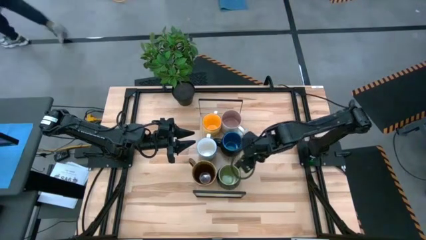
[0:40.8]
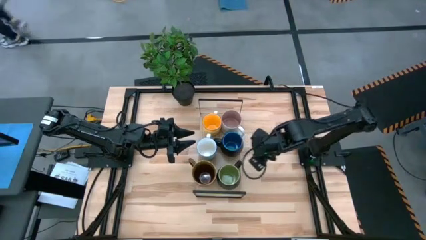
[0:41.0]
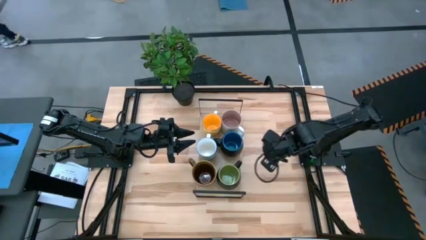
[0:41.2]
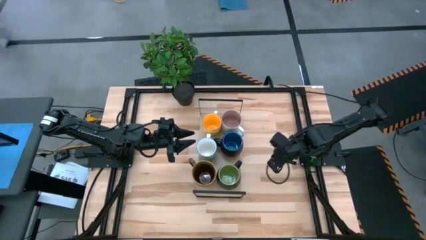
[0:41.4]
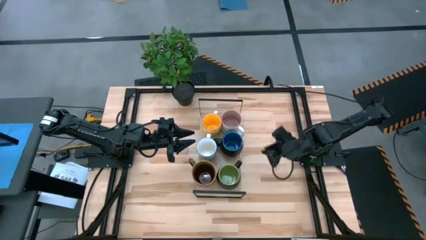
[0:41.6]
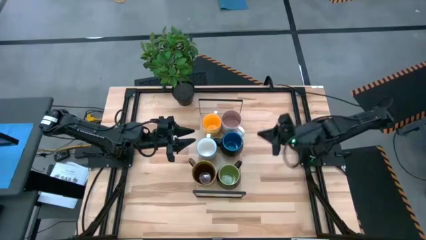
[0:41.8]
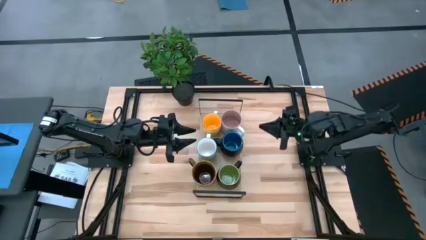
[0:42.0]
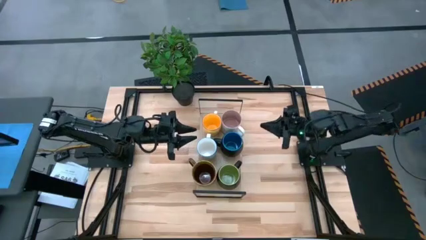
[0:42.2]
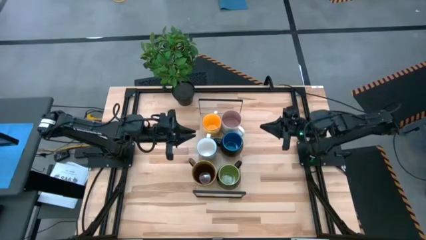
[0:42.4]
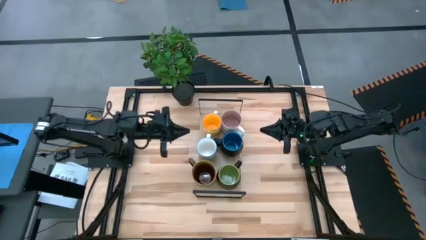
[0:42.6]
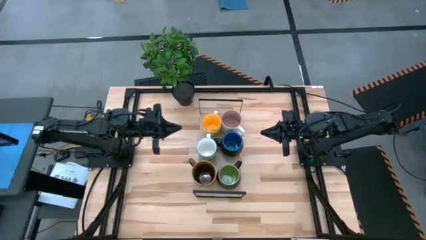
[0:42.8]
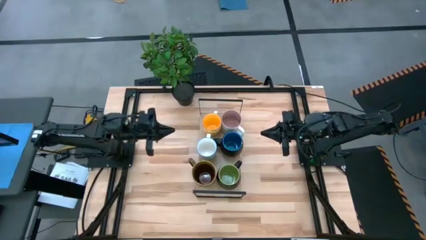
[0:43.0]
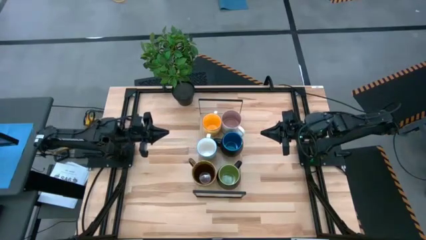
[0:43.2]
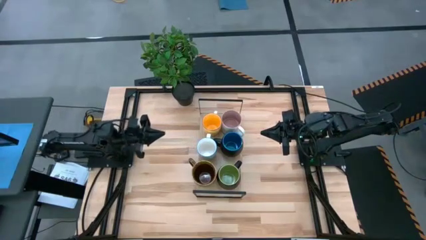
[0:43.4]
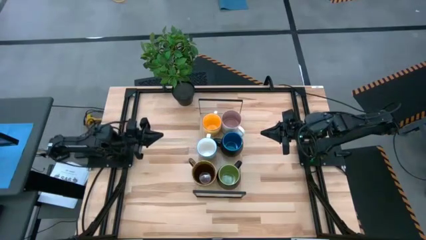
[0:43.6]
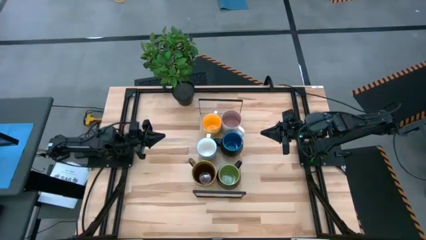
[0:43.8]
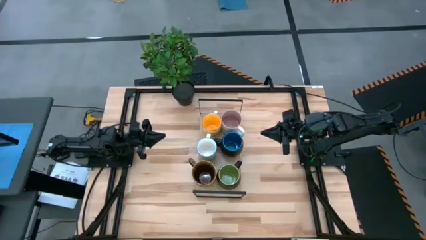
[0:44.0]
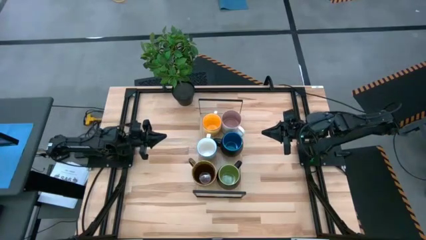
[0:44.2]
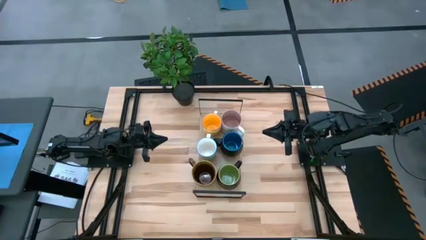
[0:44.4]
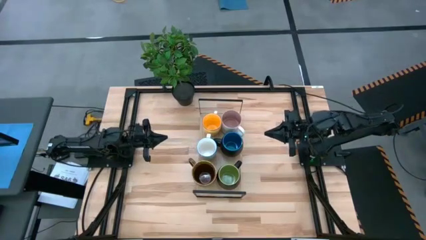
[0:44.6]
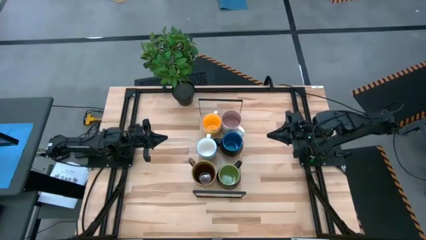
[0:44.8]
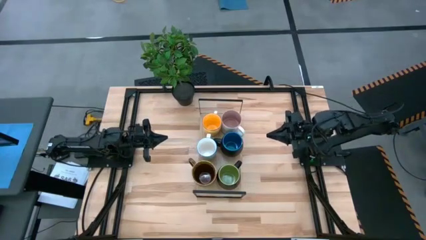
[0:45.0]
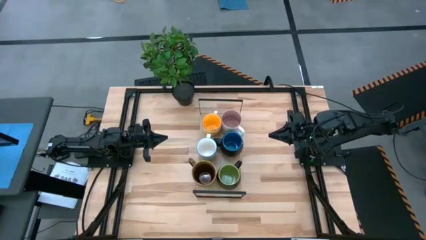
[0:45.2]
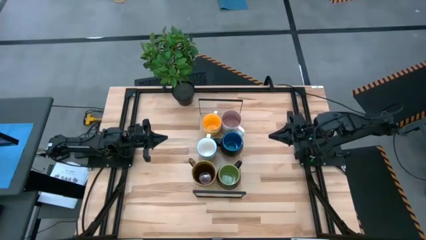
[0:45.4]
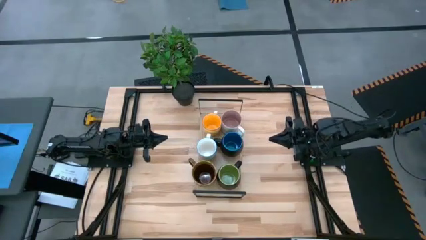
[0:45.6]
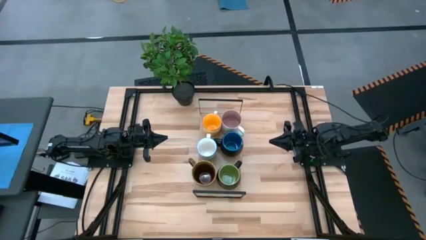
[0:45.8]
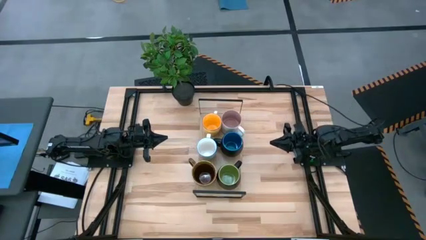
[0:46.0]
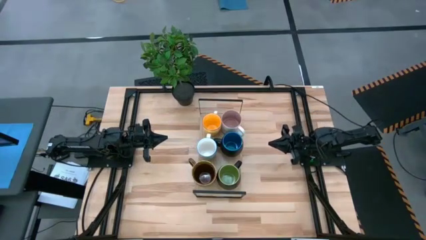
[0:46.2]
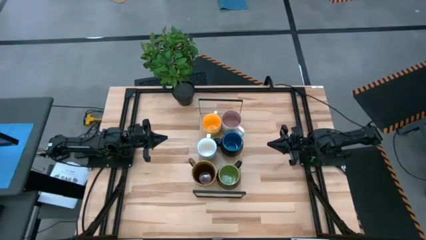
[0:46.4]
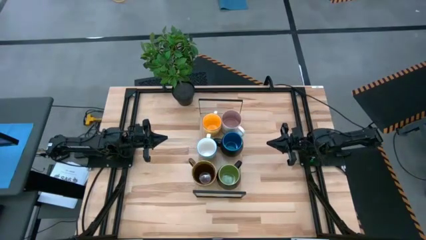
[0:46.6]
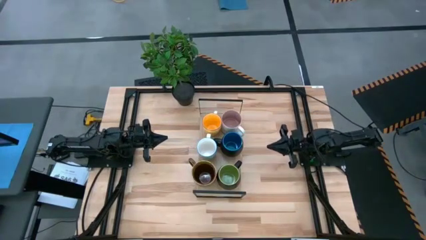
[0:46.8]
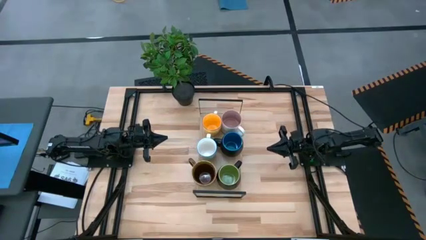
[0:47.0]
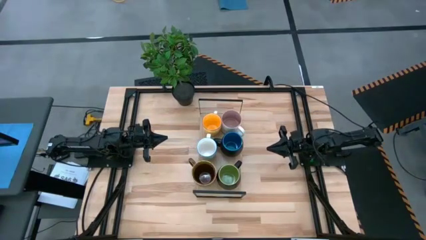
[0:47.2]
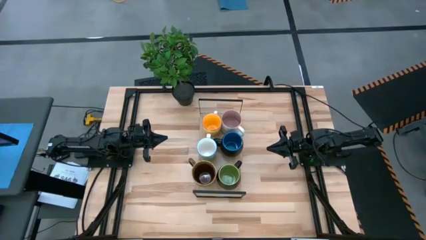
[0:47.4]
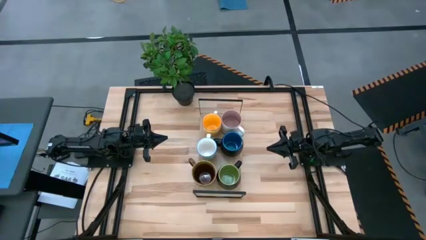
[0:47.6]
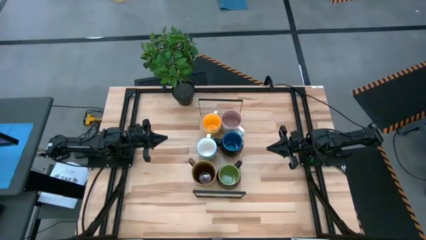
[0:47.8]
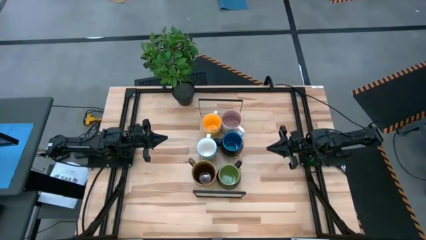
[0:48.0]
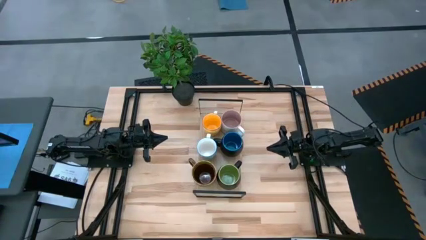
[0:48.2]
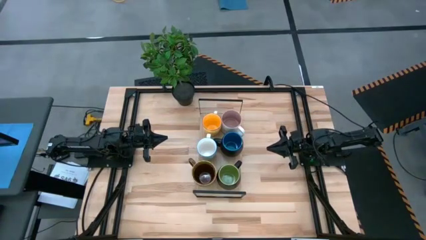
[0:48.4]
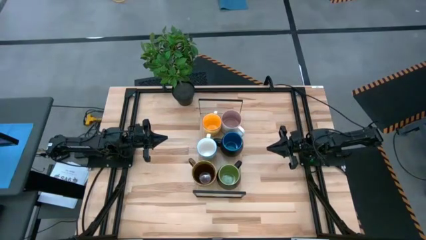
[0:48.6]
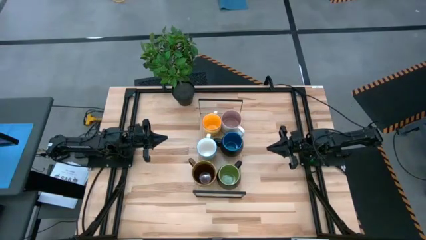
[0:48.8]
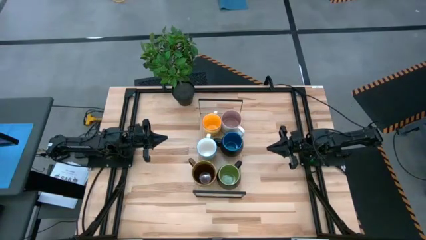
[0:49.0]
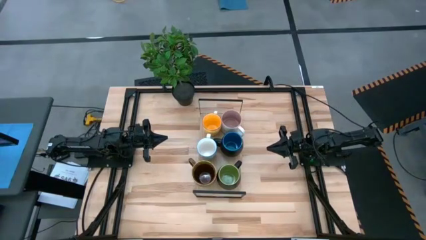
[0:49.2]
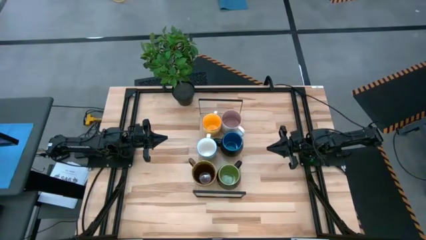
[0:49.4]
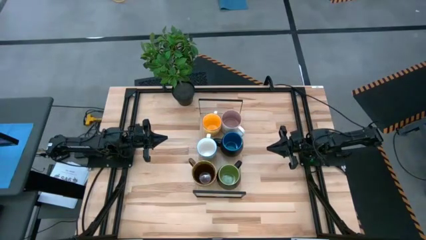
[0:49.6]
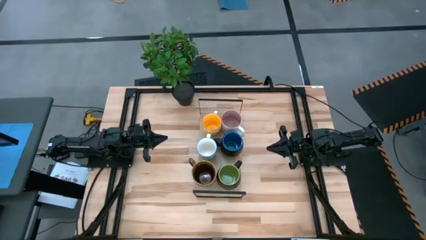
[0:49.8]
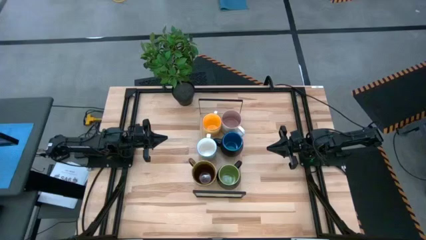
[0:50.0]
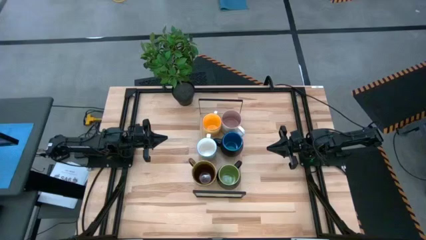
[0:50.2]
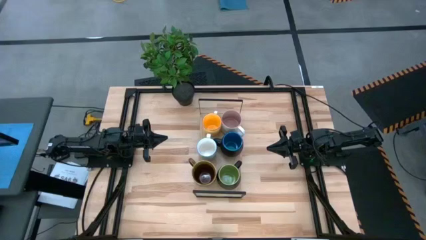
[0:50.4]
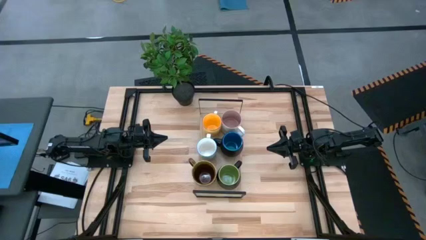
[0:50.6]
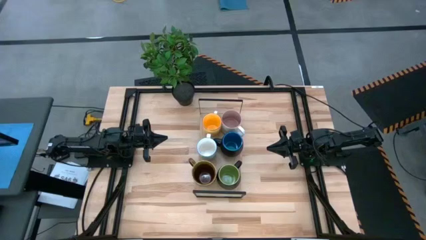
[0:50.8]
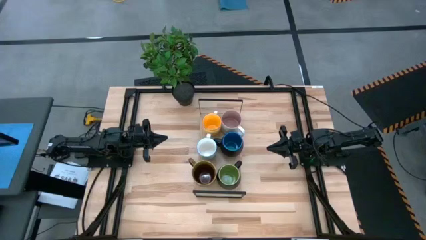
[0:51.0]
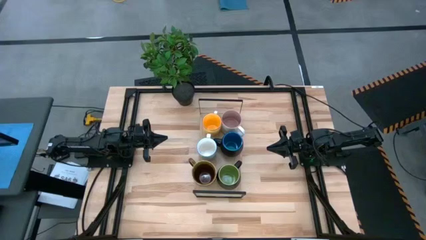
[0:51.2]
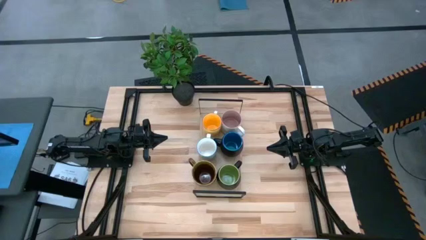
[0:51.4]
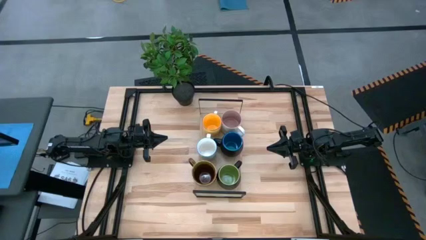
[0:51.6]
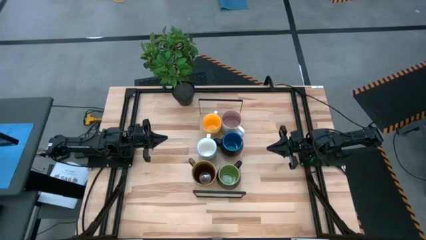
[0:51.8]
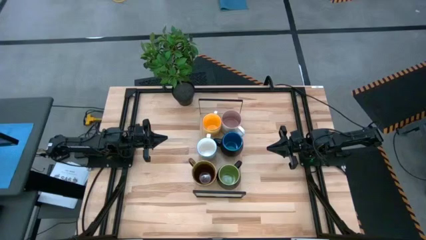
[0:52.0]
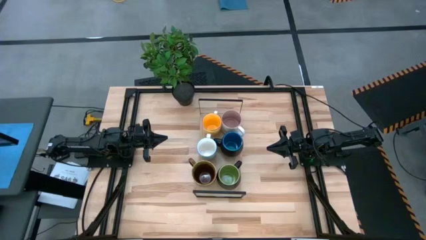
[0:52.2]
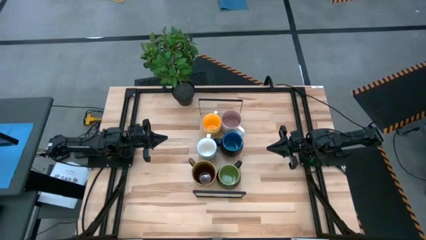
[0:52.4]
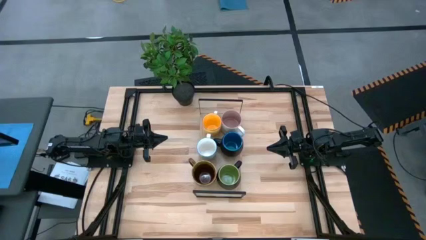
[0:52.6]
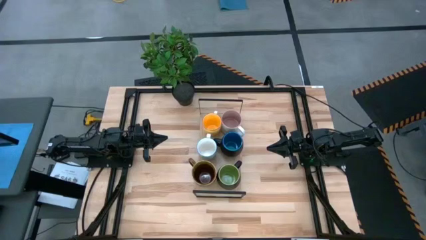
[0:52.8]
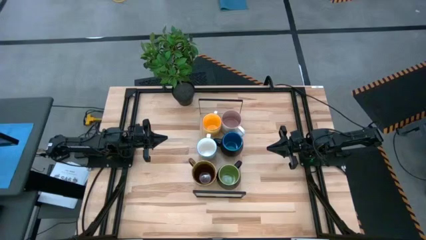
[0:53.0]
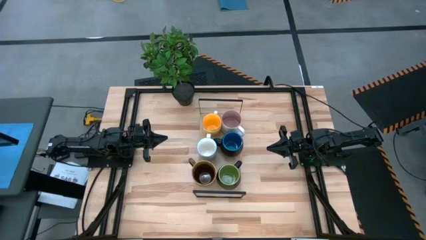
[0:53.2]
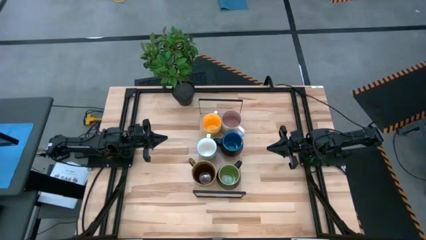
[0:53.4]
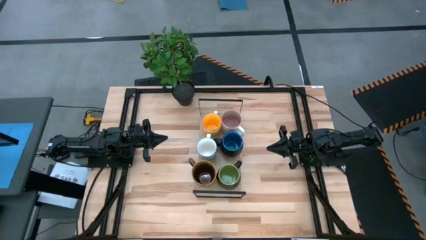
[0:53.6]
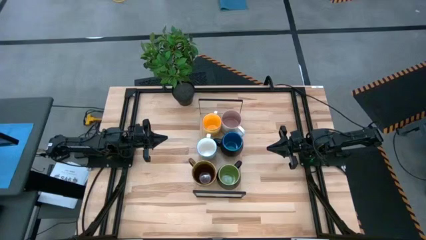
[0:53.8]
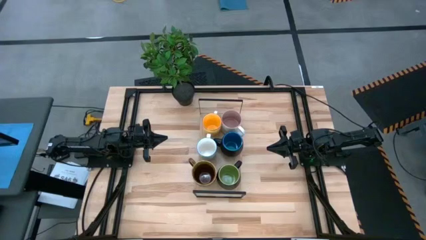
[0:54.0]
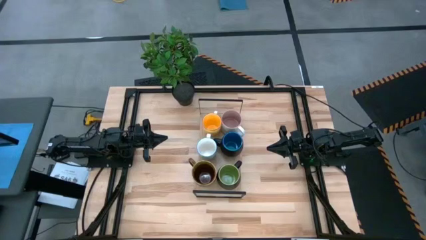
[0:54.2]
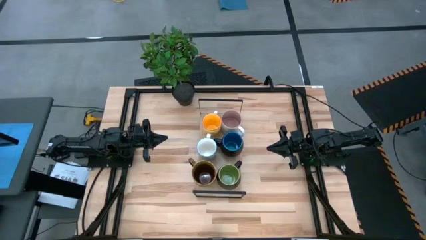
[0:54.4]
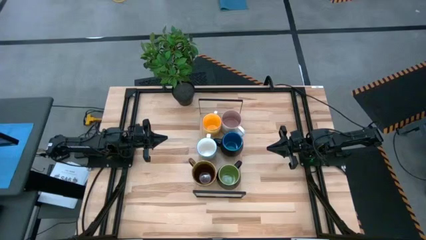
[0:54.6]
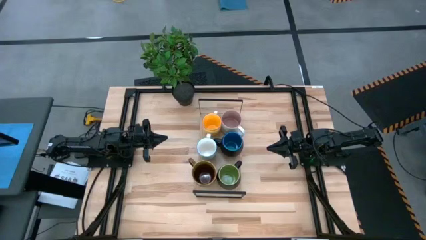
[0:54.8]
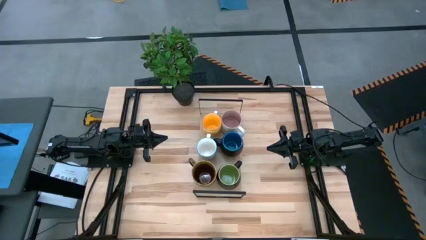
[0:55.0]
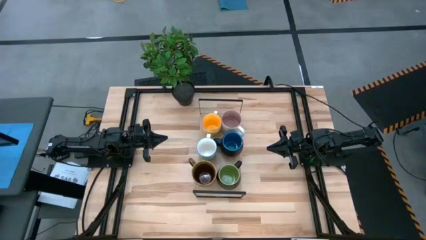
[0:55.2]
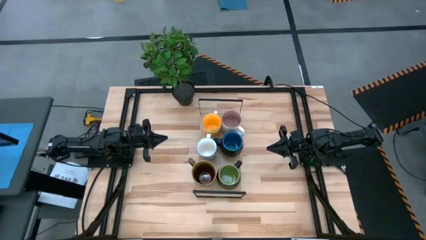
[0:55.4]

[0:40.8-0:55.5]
Task: Place coffee mugs
Return to Home Position
